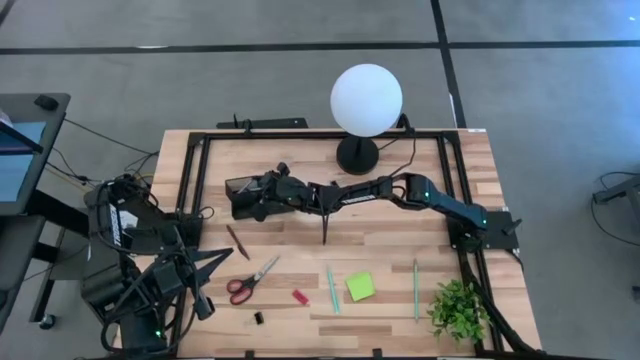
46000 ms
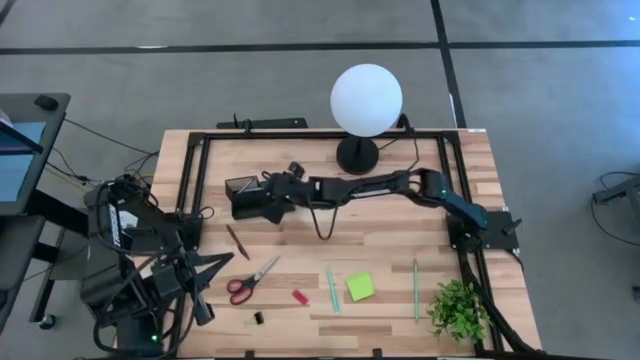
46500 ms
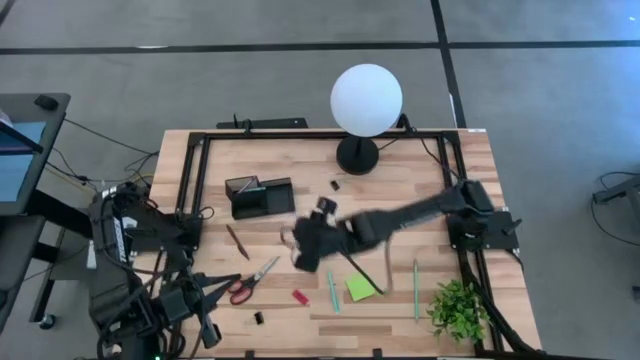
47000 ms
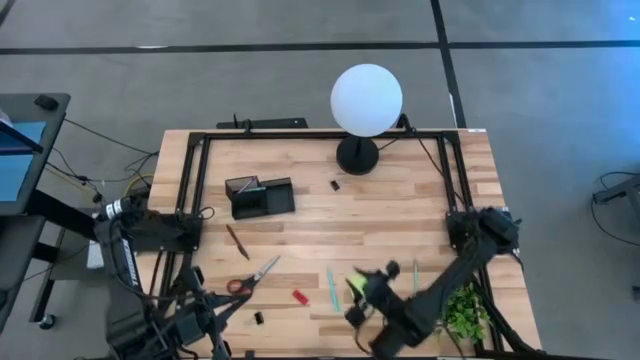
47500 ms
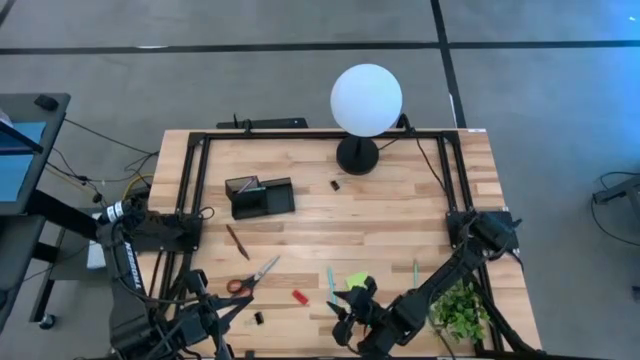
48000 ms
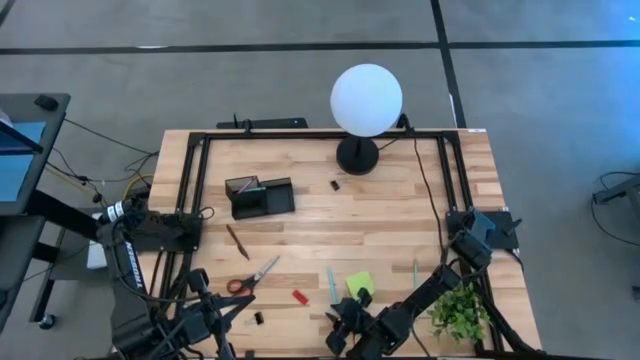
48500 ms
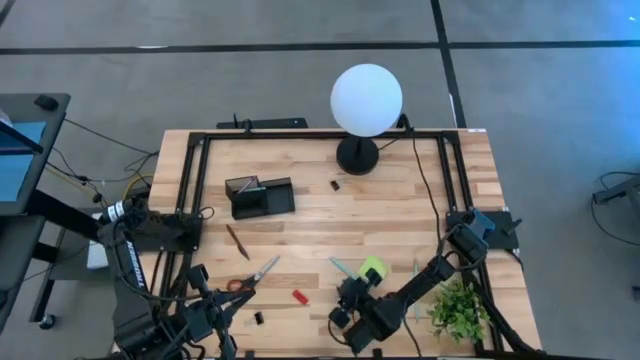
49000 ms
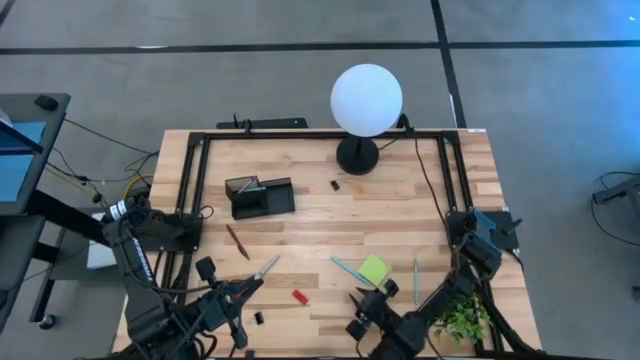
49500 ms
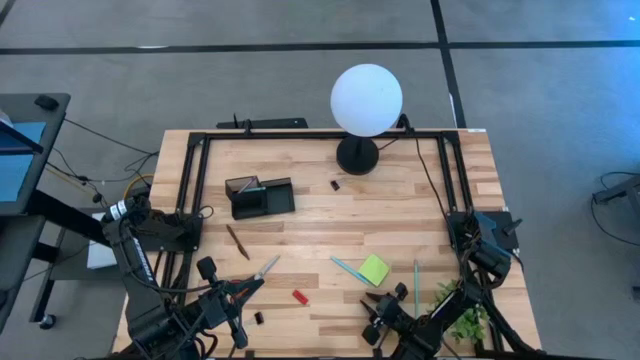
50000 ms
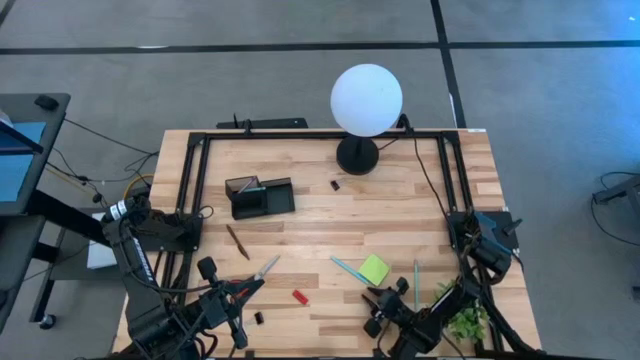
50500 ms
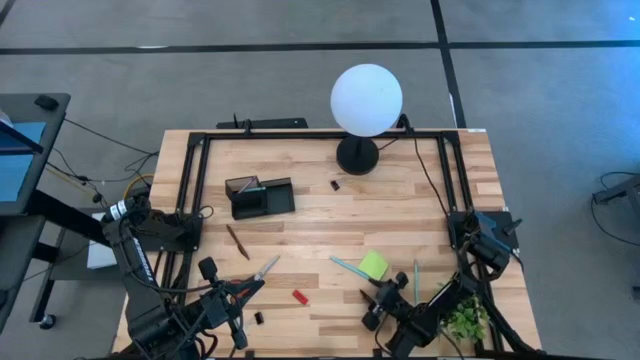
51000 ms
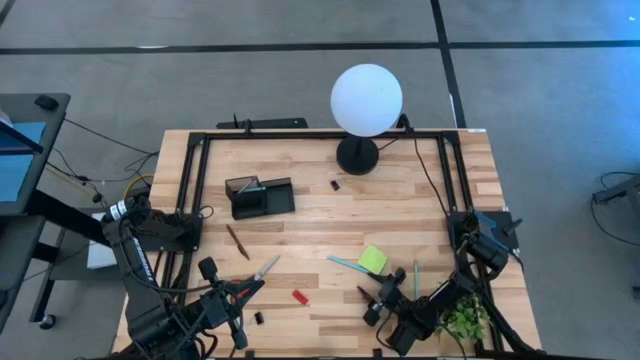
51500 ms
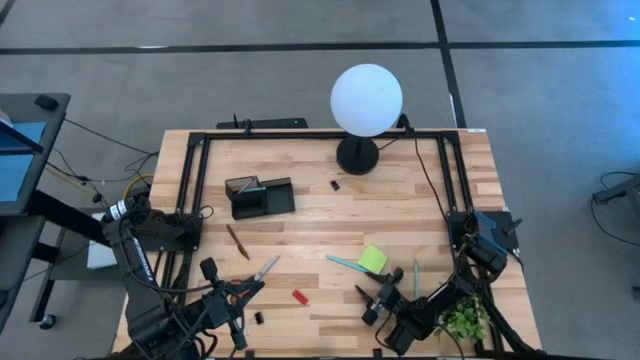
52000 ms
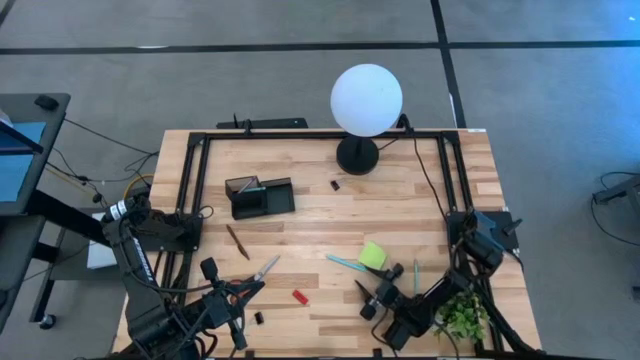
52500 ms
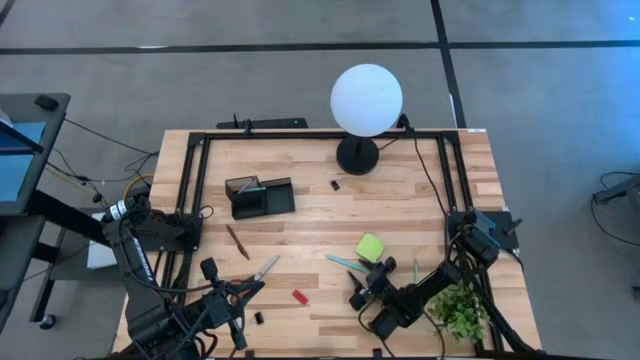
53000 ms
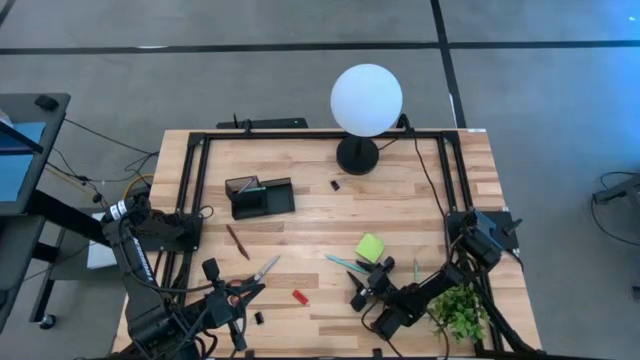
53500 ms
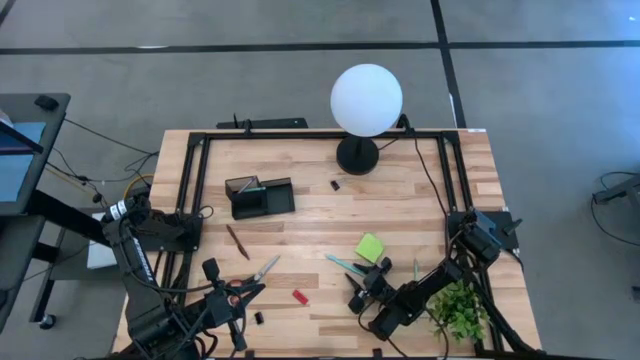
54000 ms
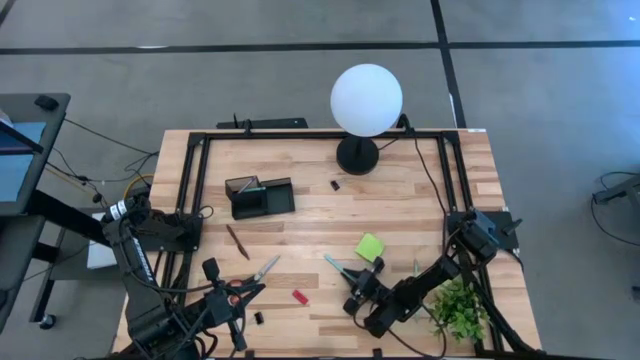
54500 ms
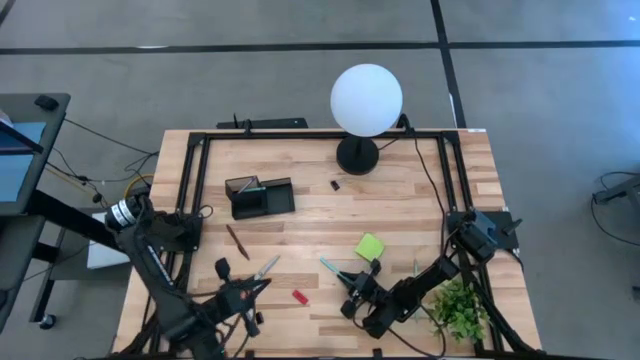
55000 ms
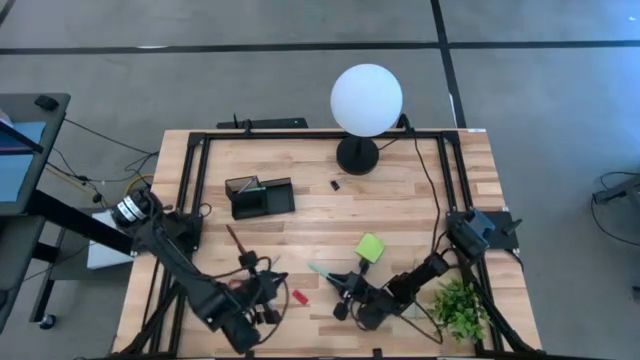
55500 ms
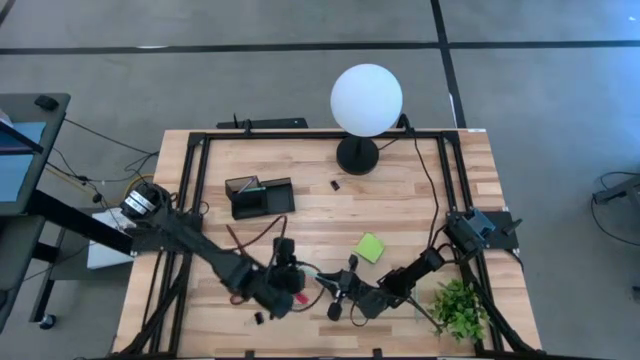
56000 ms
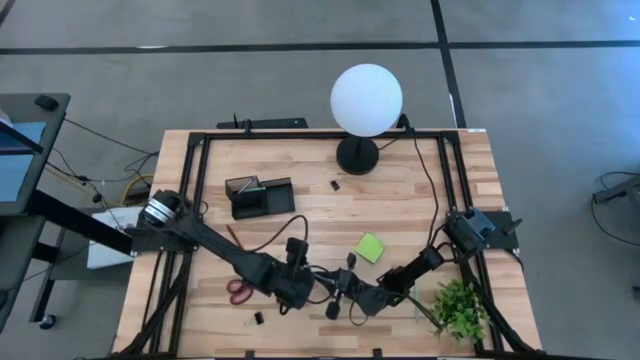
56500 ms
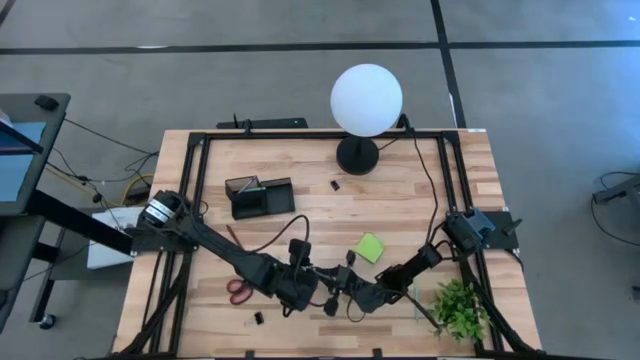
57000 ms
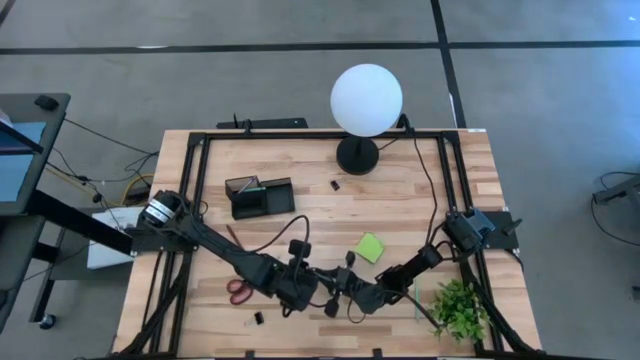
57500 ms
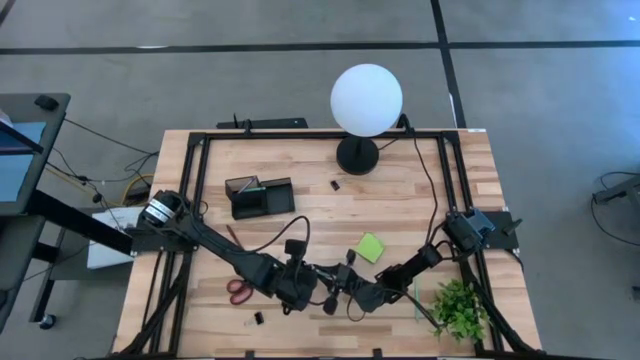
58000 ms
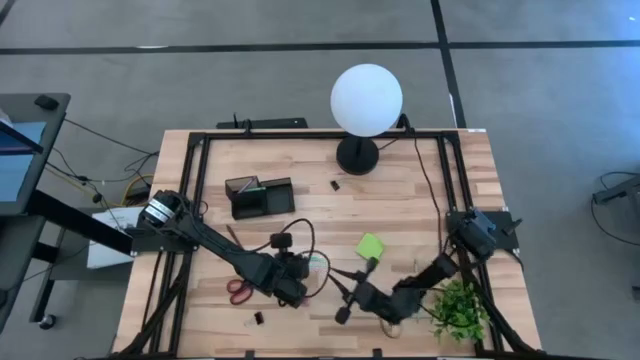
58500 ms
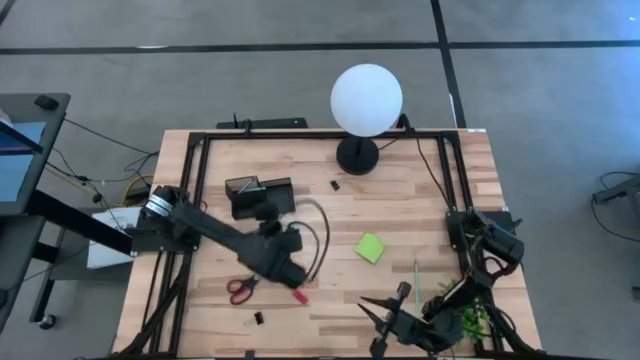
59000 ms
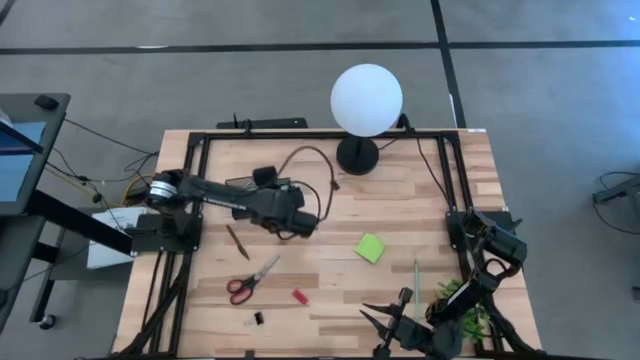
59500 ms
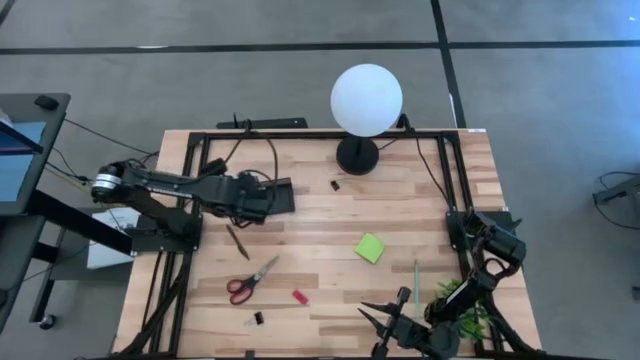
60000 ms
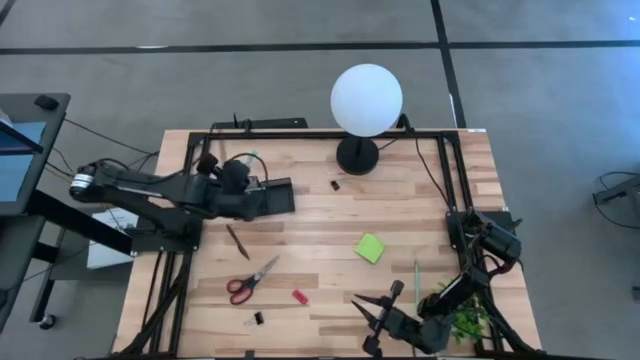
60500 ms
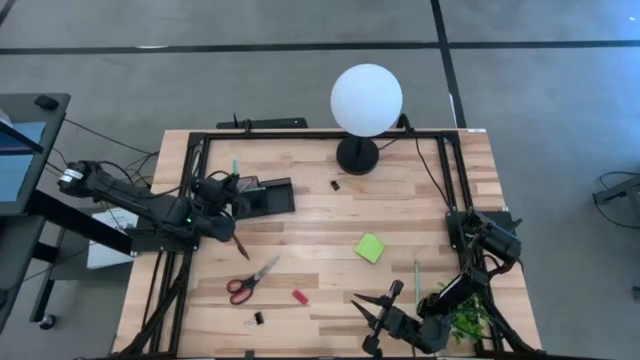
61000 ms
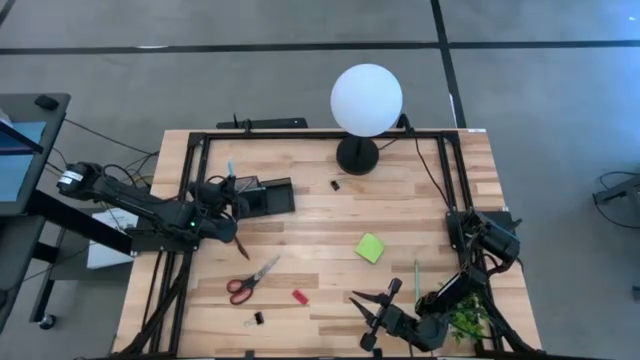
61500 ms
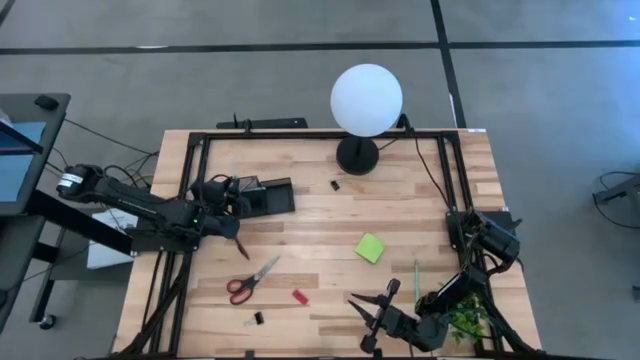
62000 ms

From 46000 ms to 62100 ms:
Task: Pick and place office supplies into organizer
Put the blue pen into the black desk organizer

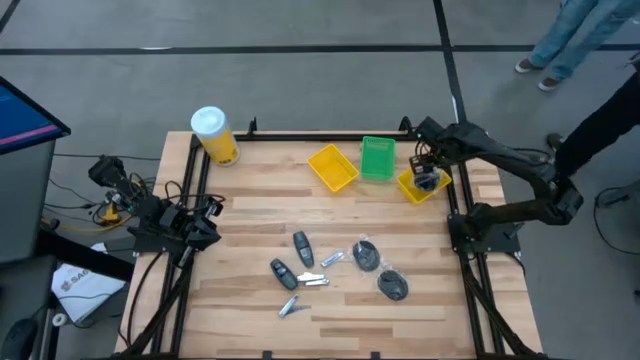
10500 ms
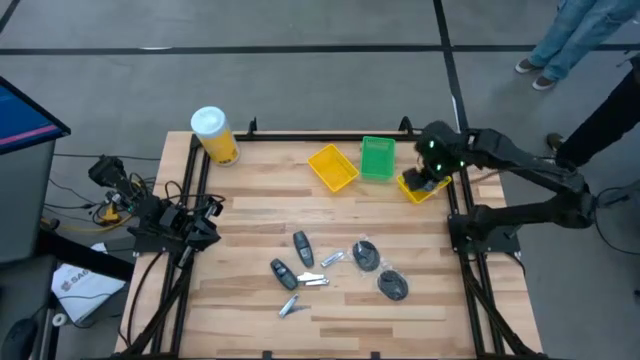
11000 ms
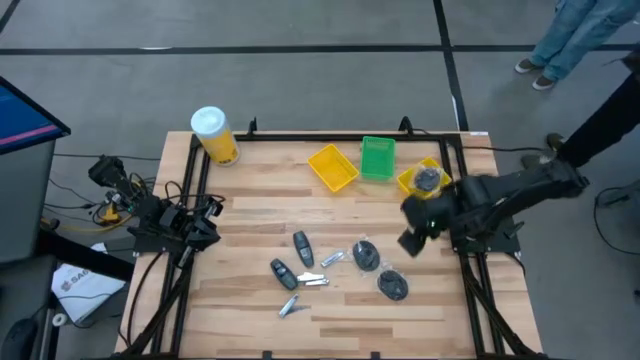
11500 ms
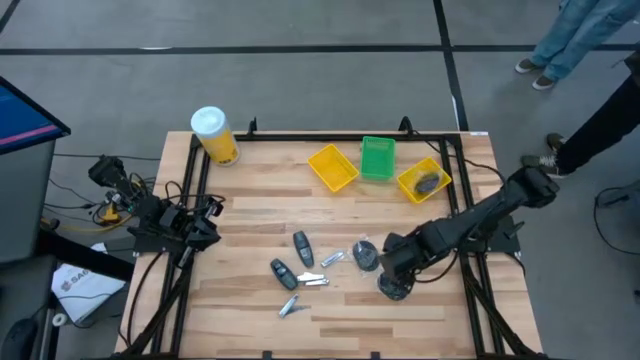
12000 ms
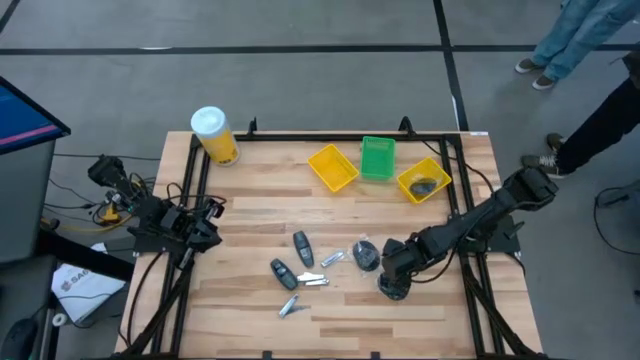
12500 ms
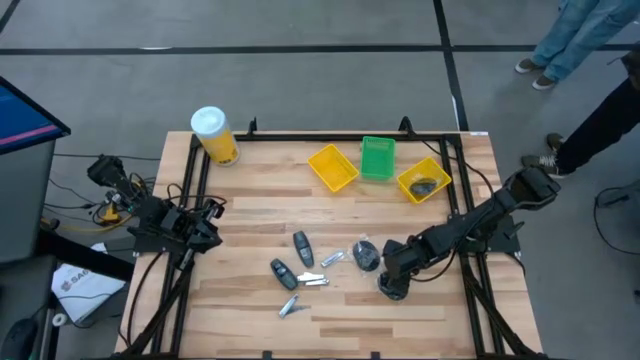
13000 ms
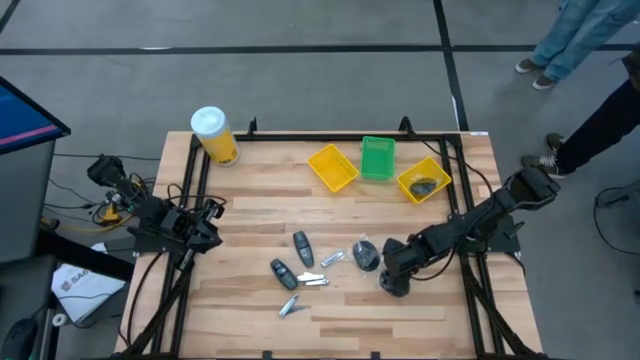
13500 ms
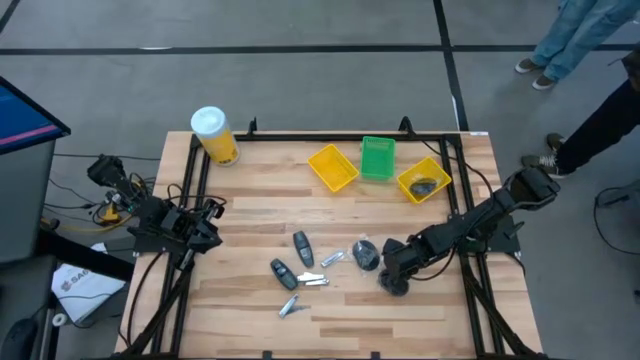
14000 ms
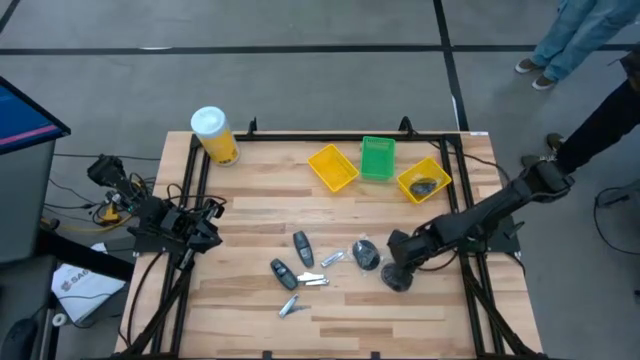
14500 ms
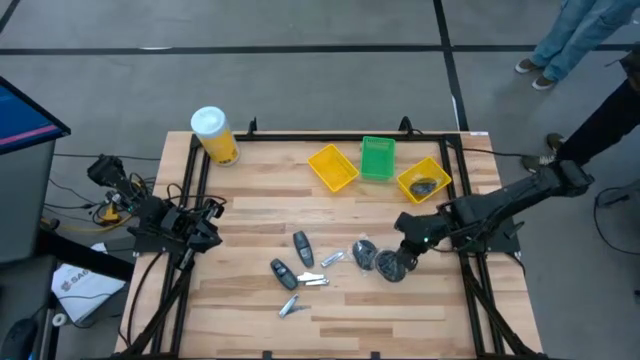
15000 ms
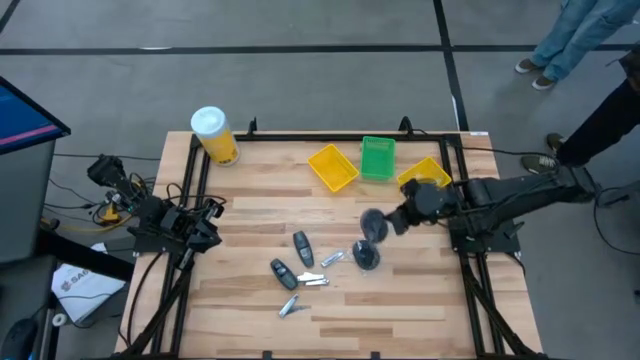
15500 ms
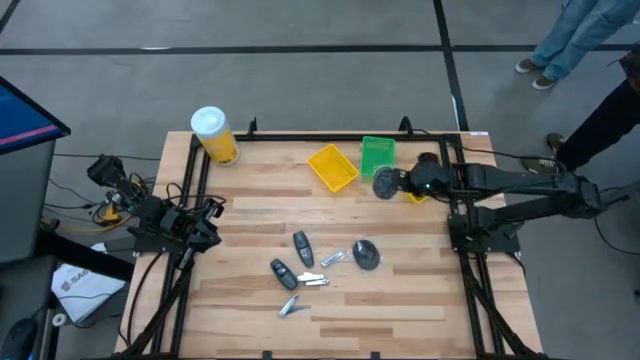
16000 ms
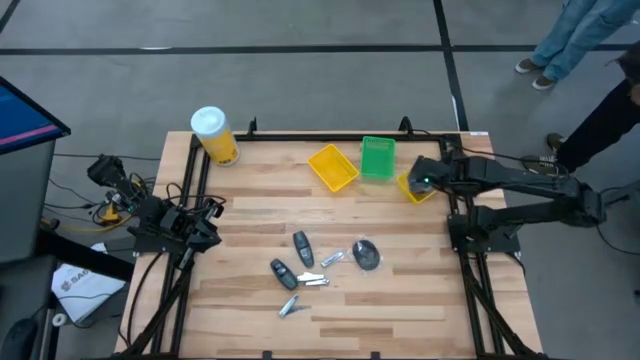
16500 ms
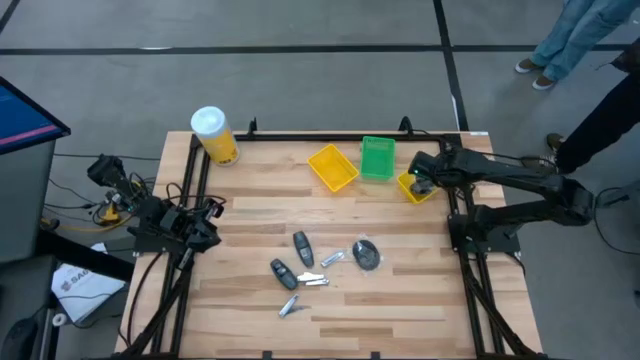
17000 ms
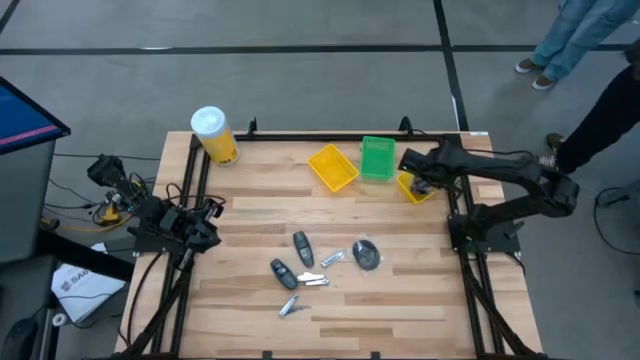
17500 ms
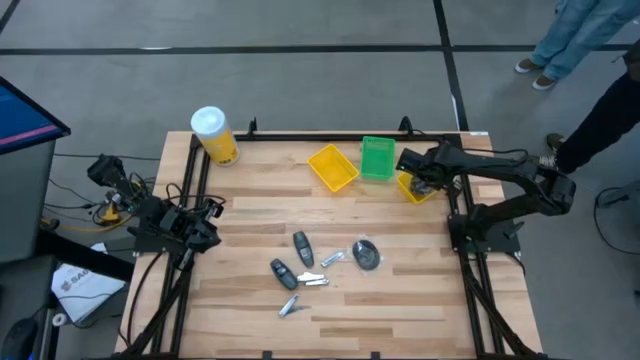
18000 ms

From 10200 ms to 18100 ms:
Task: Pick & Place Travel size toiletries
Put the black hairbrush into the right yellow basket
